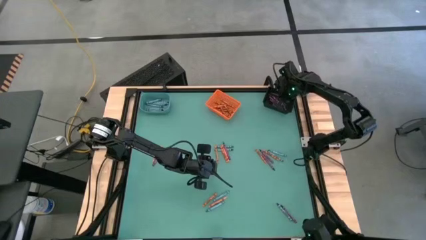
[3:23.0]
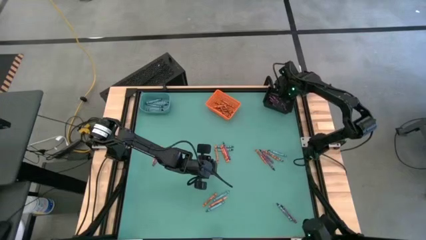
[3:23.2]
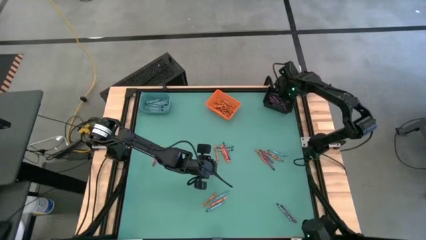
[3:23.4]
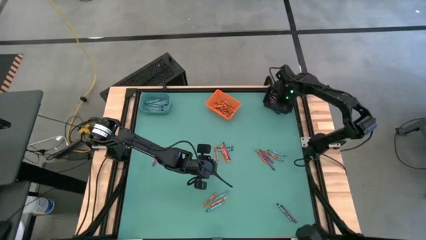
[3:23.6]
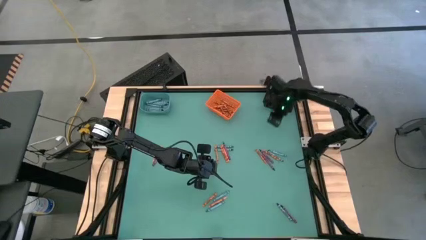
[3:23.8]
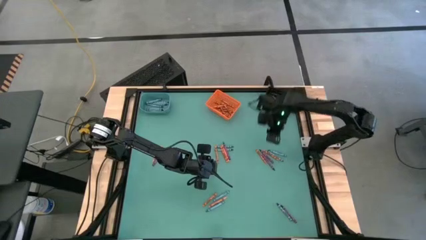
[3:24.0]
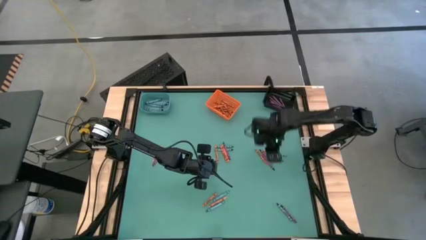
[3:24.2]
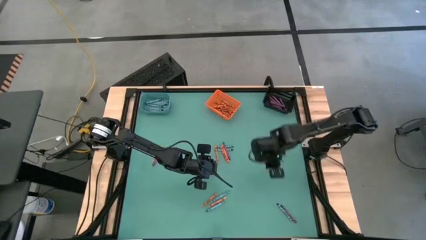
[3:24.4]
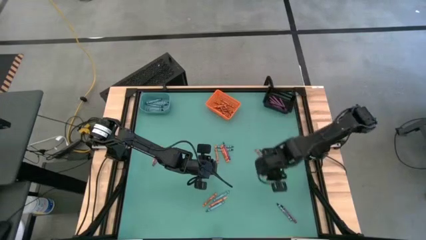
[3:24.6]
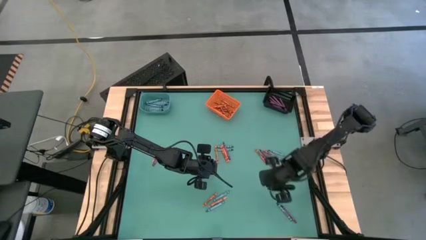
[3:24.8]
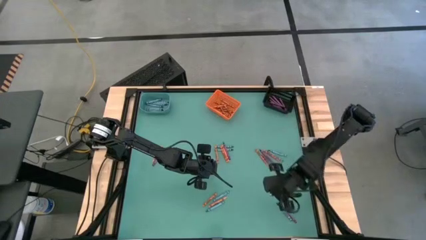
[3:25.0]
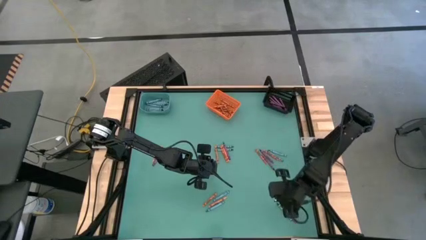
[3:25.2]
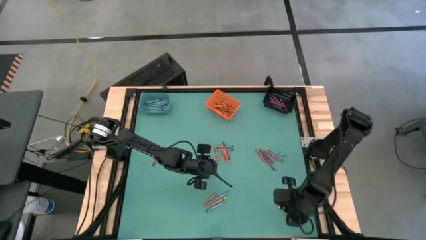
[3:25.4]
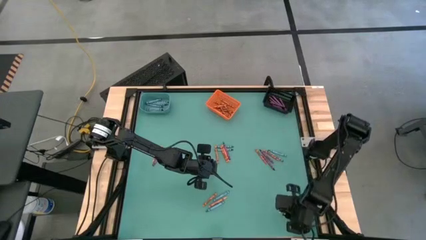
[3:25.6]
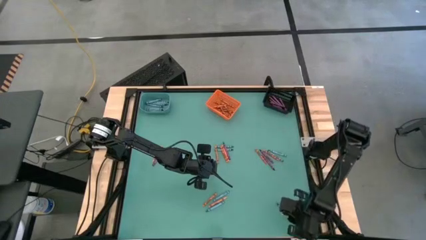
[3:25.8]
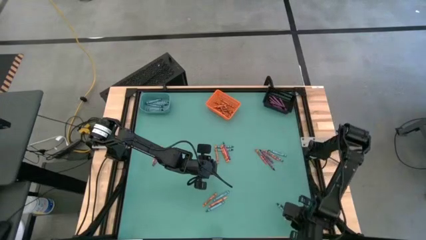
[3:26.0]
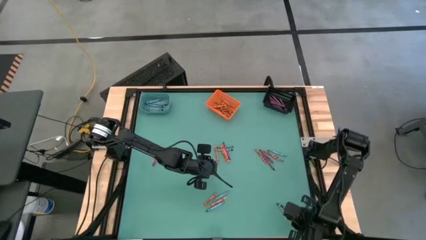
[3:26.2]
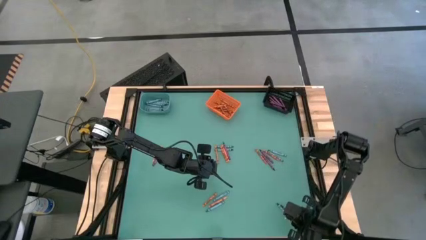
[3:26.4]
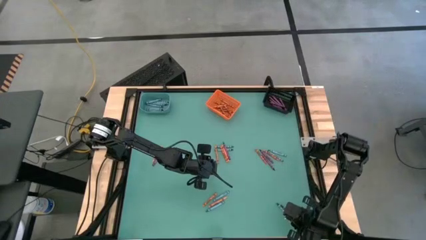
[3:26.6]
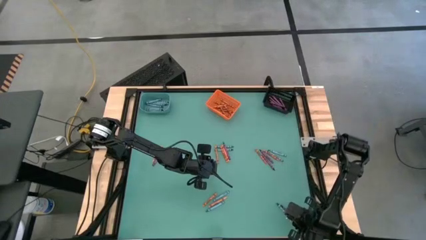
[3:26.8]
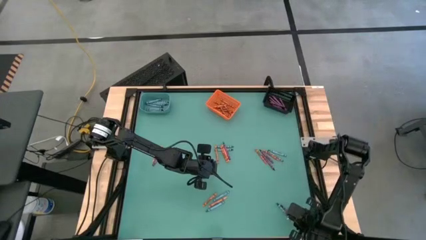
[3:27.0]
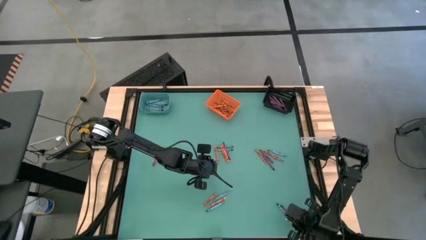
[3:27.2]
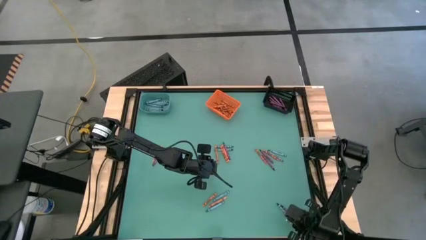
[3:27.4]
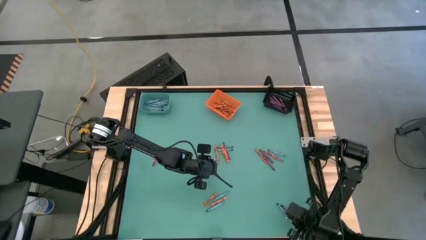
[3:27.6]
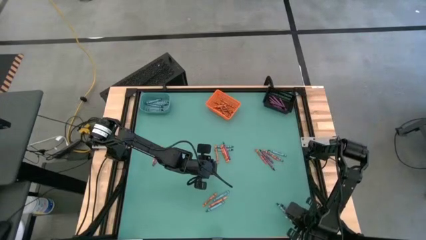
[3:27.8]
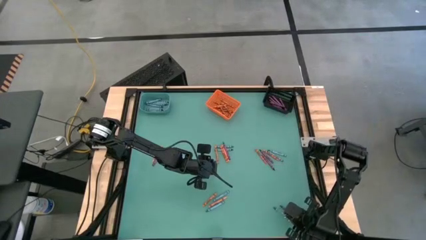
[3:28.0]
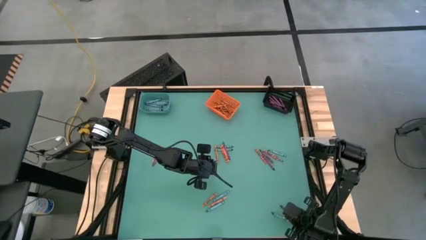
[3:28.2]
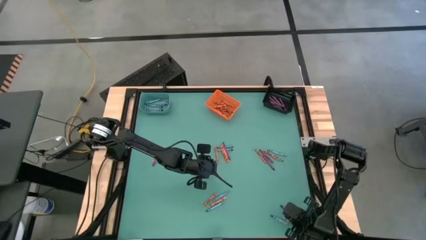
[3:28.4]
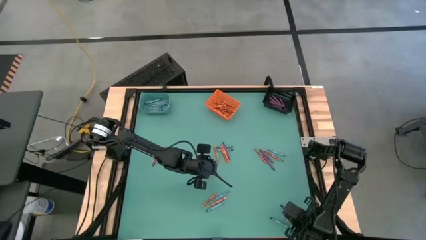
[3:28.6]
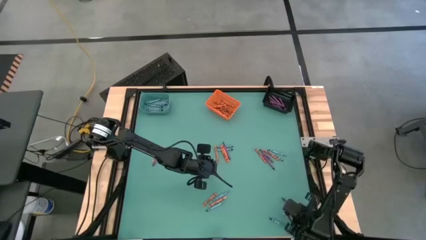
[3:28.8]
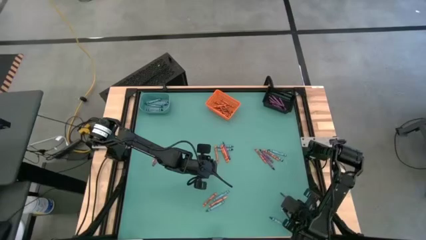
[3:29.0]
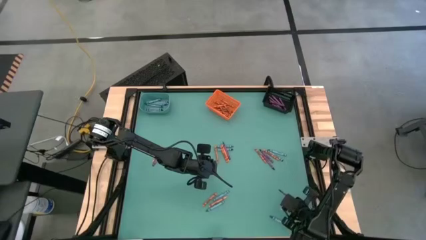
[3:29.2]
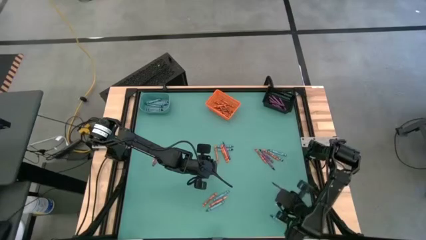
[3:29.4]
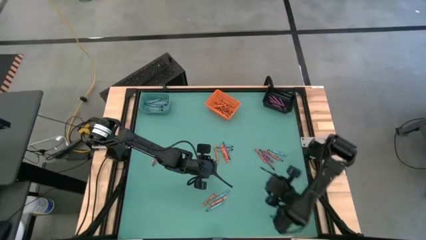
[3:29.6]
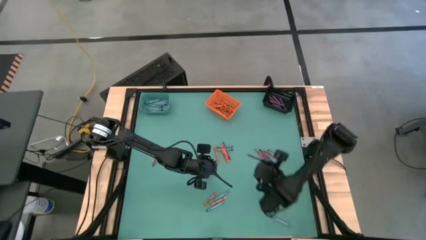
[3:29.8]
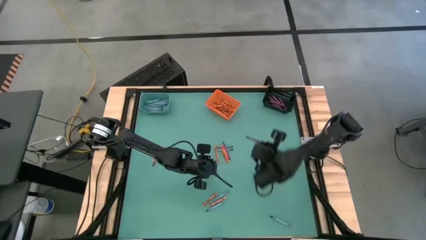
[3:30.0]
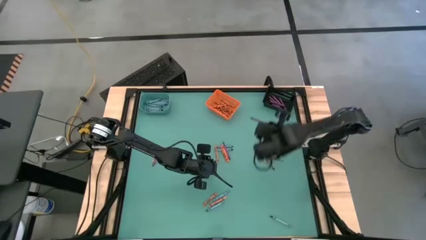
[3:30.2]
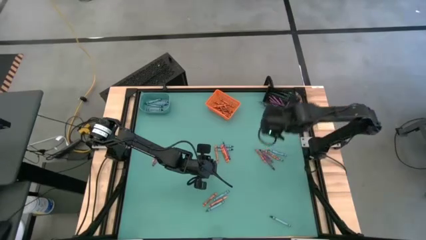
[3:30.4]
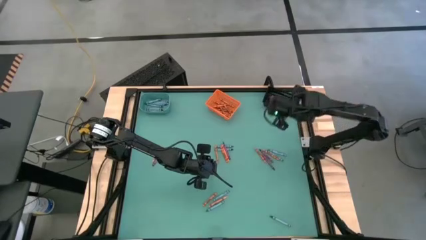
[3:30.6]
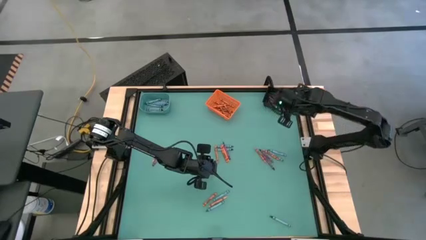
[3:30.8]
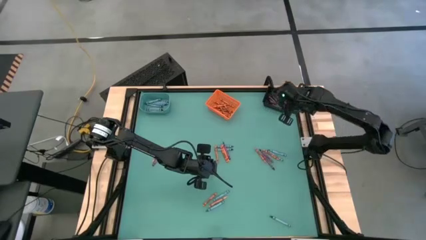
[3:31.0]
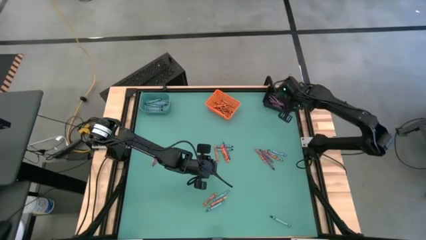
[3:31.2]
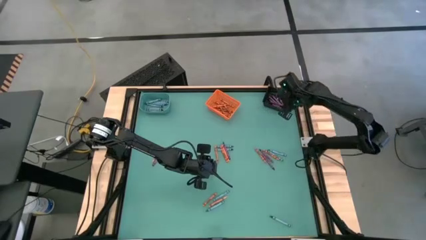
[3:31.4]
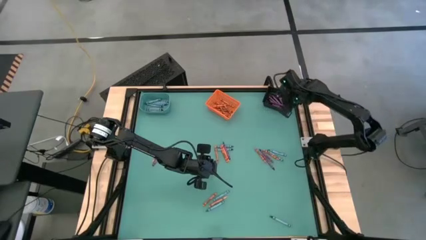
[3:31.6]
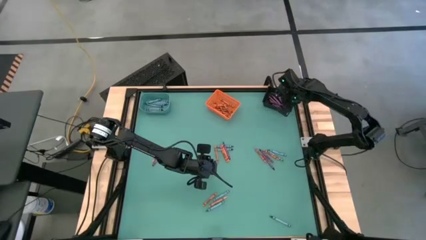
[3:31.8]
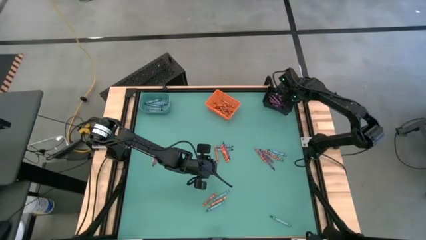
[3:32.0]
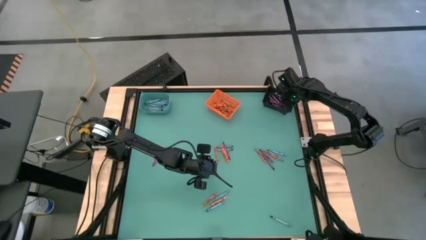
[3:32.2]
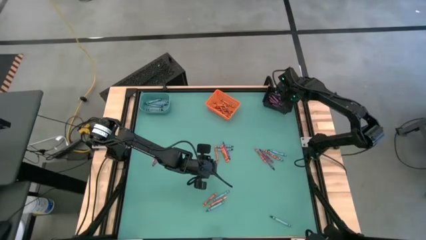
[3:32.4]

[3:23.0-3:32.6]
Task: Sort crayons
Put the violet crayon into the black bin

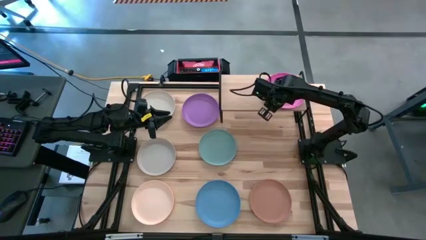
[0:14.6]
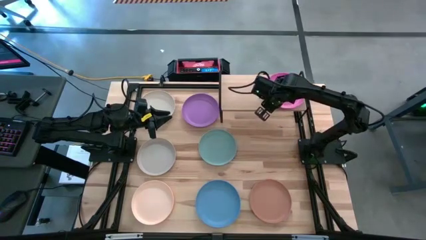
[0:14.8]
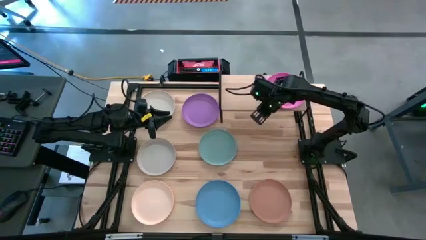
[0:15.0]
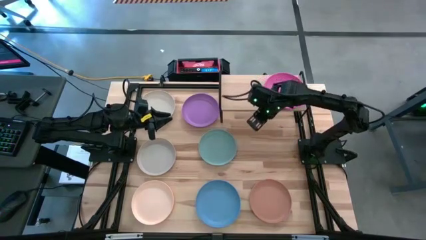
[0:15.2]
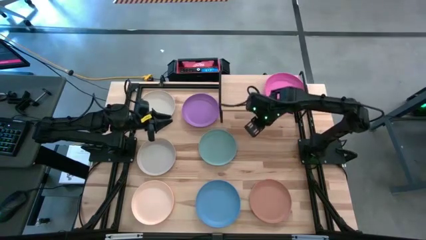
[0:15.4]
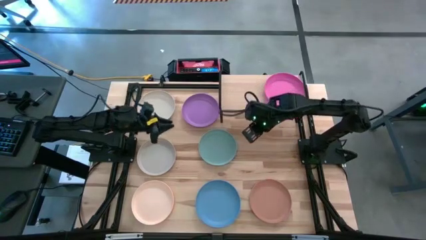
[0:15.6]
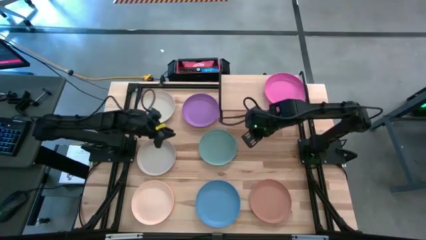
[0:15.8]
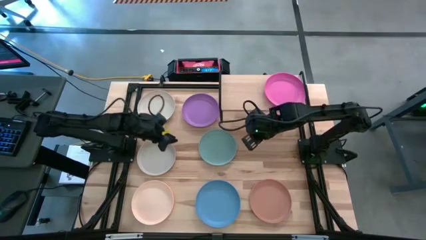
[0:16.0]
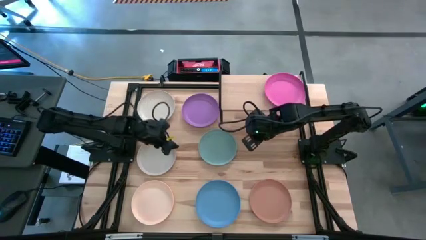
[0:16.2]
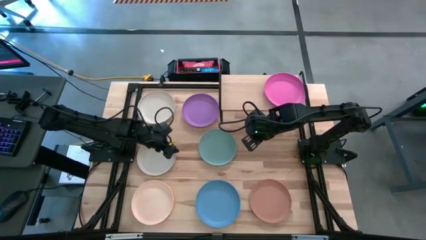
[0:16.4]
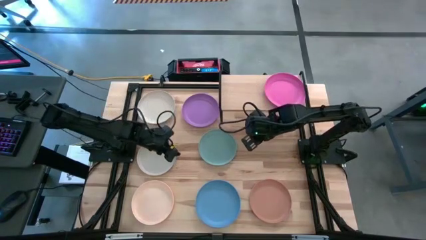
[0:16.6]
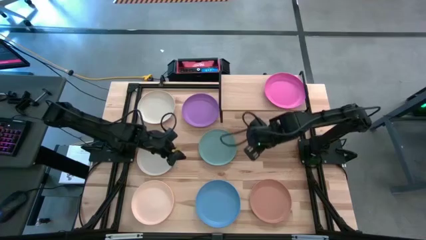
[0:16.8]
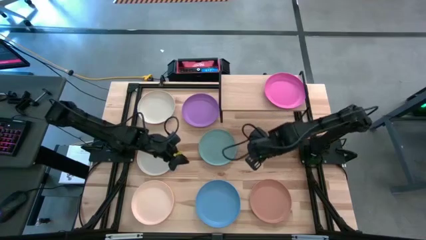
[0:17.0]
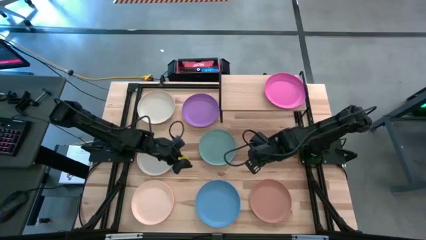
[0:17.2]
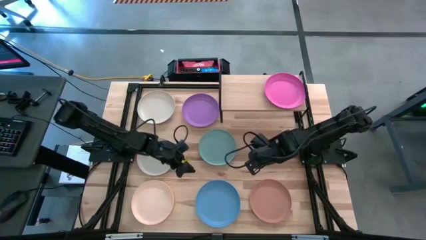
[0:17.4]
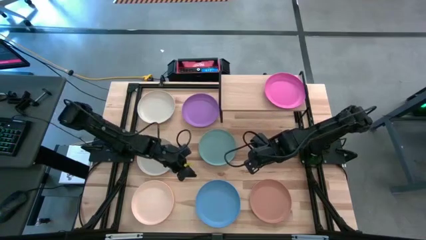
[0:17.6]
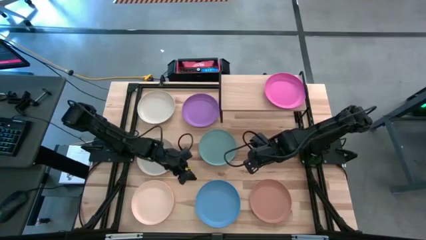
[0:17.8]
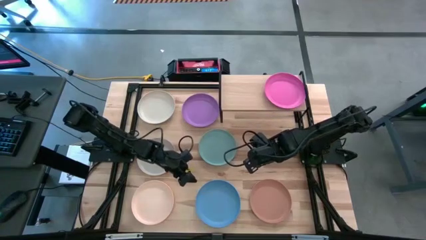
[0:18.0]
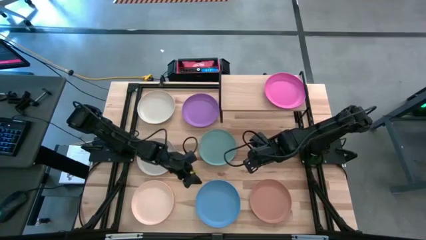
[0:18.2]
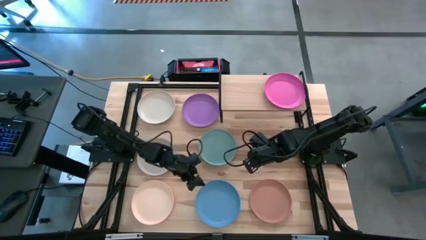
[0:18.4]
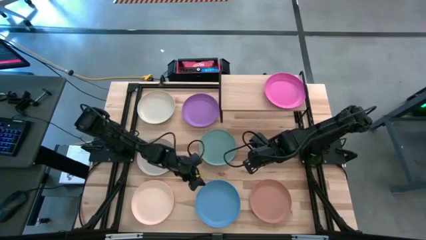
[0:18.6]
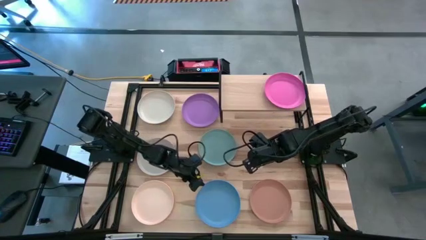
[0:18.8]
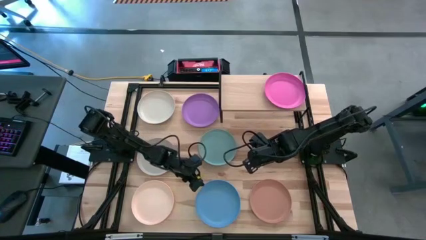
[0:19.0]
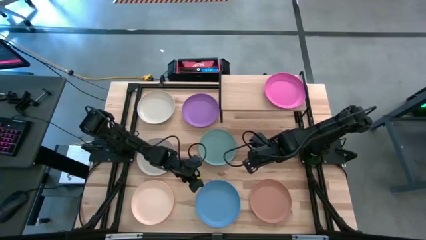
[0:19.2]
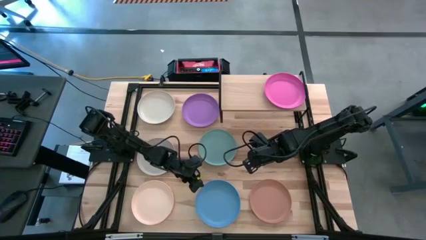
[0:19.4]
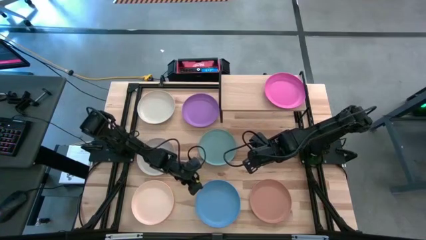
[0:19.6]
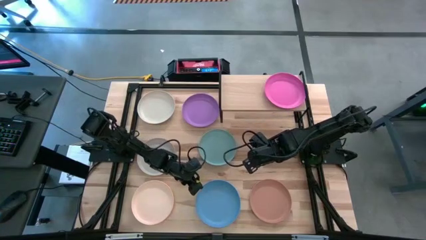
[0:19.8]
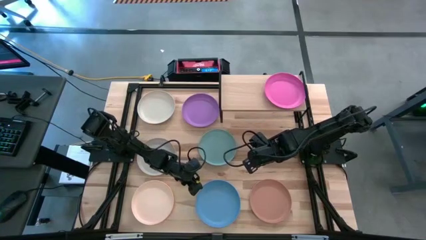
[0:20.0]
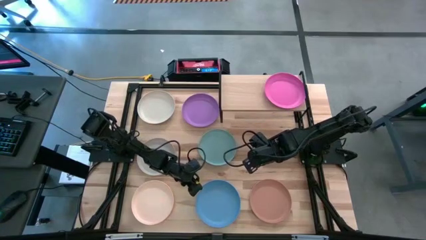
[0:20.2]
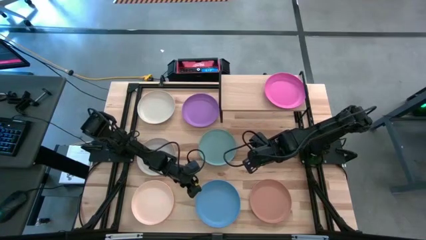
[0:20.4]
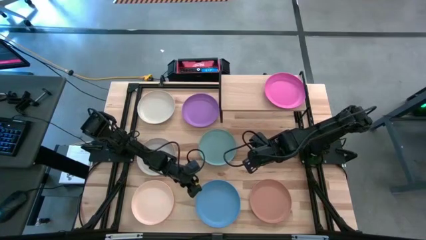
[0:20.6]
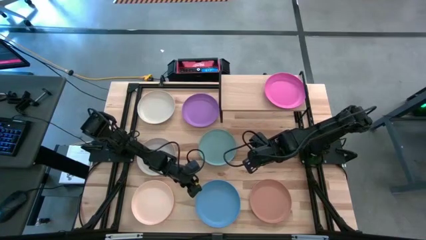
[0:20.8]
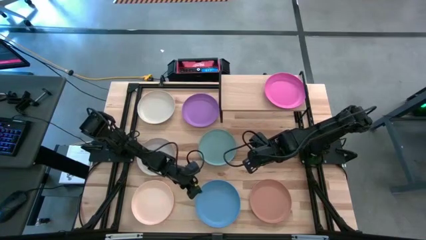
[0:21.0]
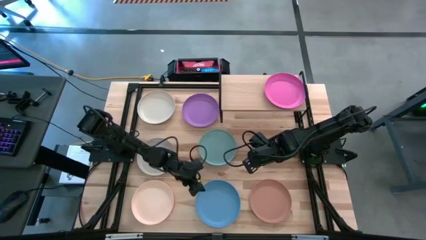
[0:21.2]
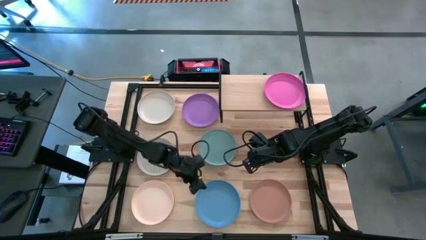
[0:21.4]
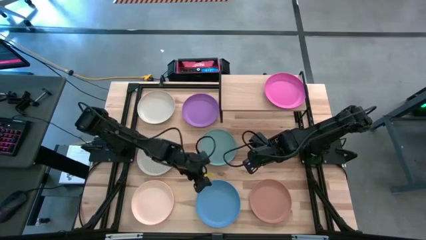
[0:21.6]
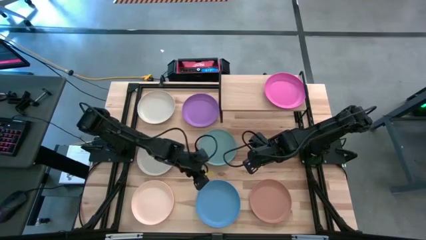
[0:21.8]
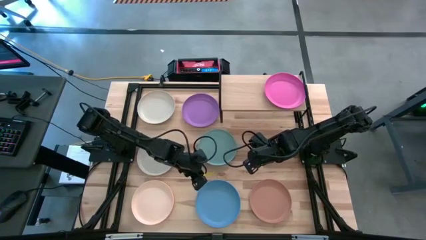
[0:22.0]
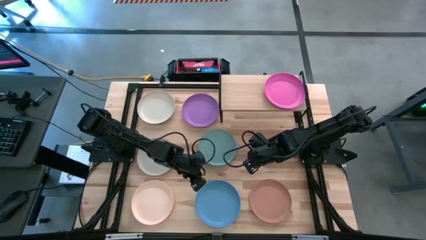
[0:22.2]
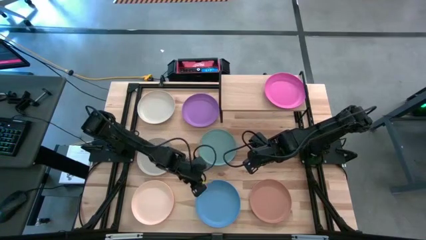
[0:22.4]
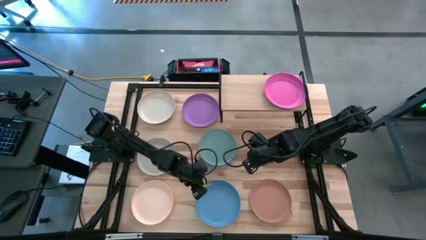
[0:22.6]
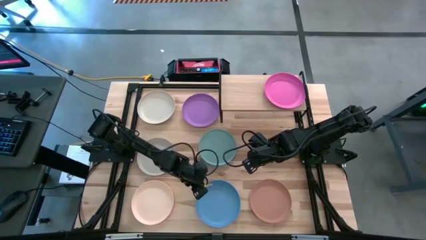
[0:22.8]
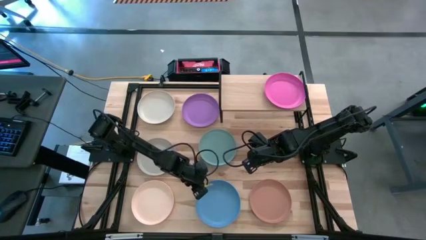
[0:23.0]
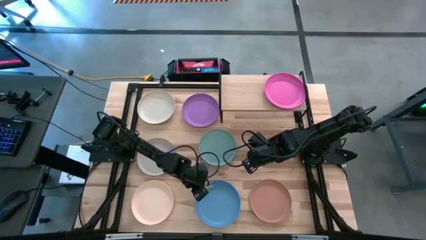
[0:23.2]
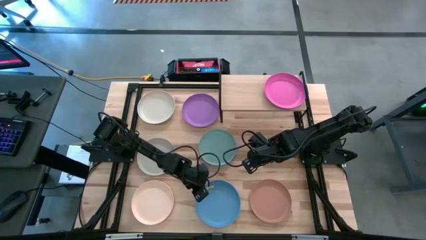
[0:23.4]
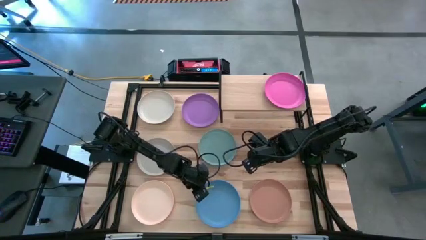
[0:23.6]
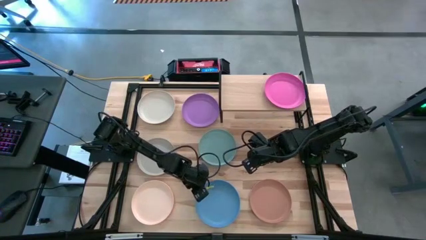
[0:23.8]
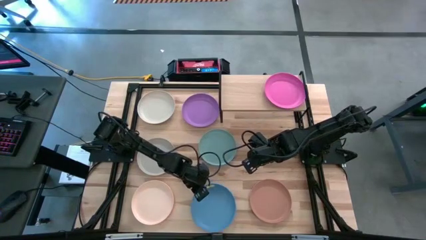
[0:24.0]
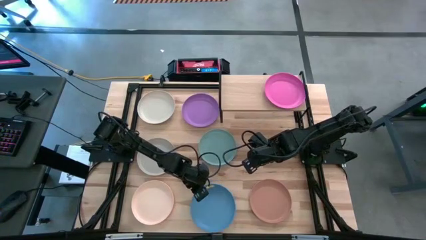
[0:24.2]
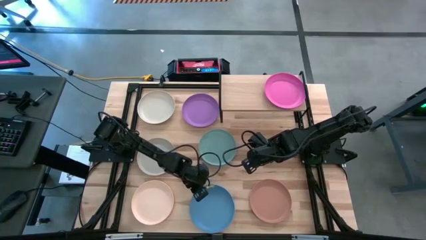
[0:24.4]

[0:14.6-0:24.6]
Task: Place and stack plates onto a shelf
Stack the blue plate on top of the pink plate on the shelf
